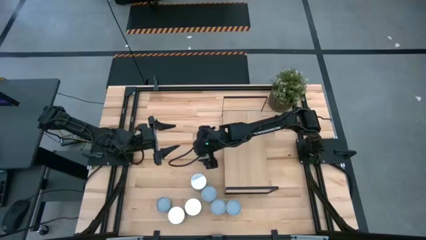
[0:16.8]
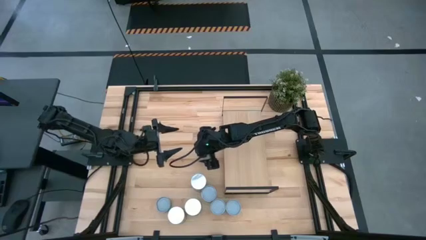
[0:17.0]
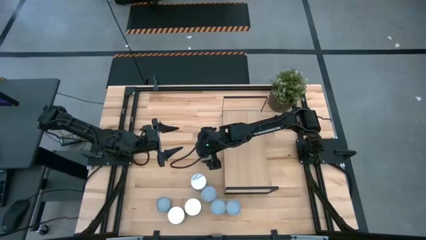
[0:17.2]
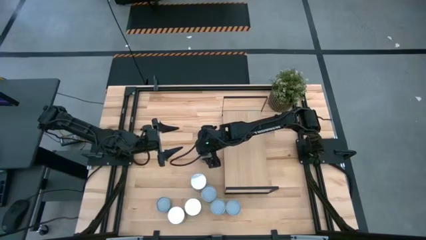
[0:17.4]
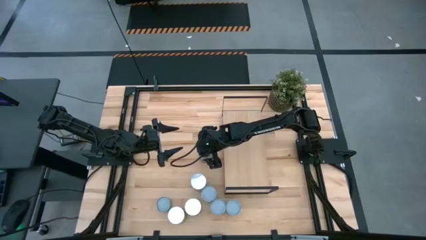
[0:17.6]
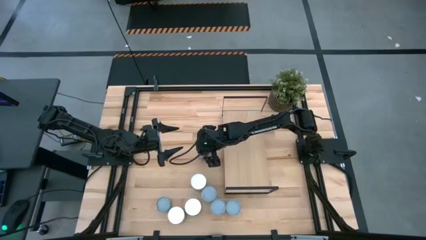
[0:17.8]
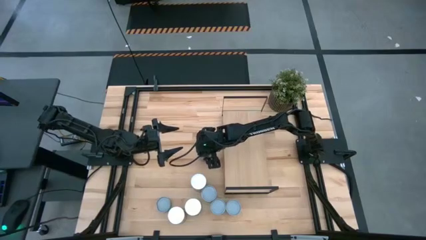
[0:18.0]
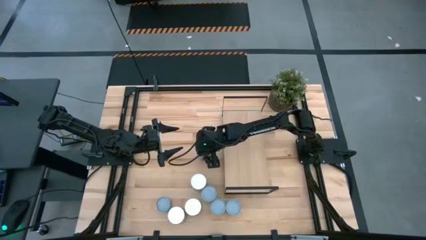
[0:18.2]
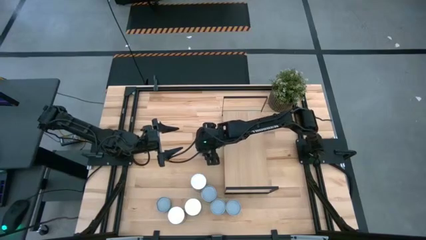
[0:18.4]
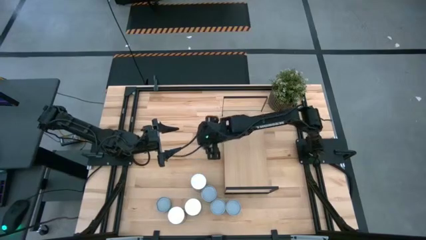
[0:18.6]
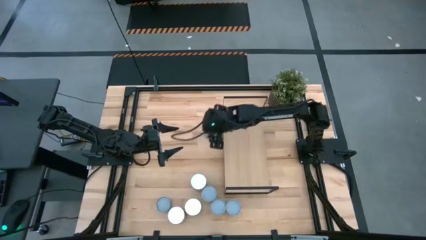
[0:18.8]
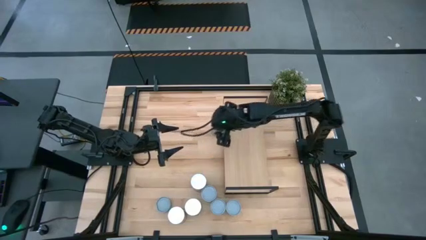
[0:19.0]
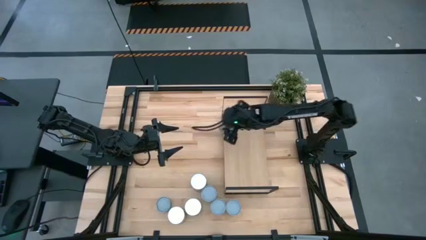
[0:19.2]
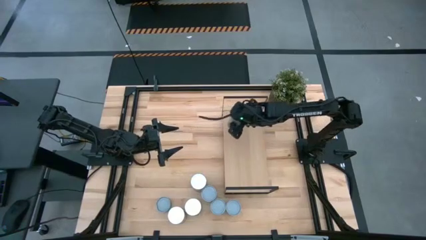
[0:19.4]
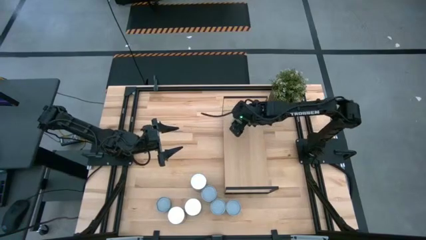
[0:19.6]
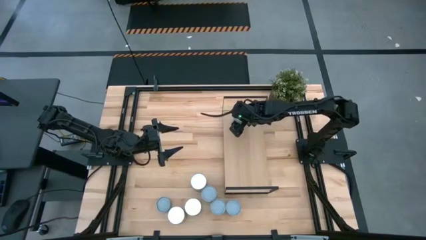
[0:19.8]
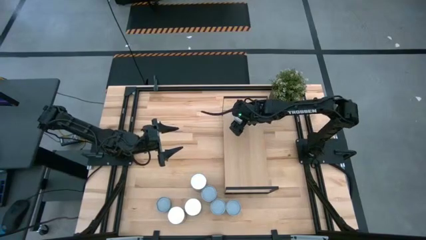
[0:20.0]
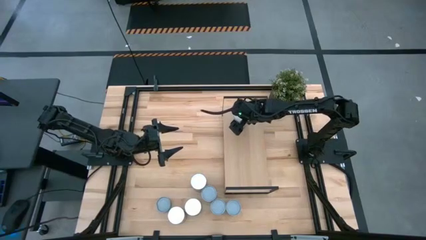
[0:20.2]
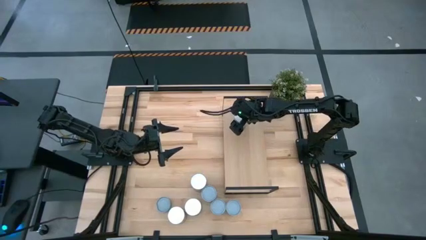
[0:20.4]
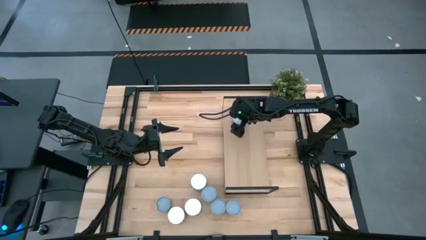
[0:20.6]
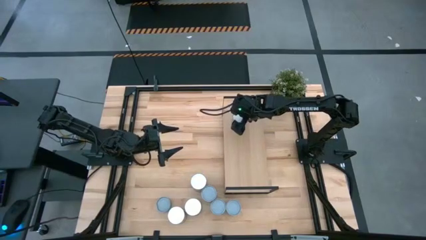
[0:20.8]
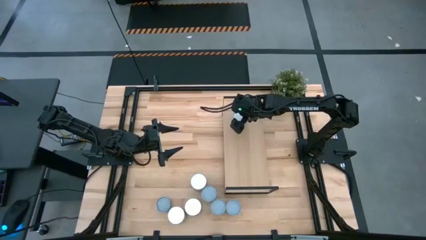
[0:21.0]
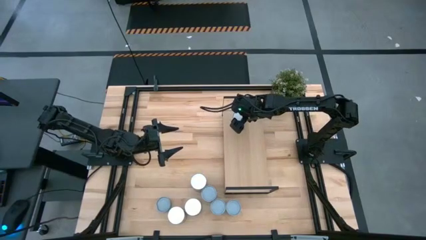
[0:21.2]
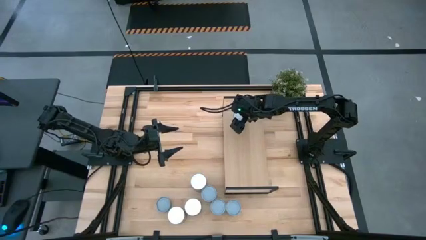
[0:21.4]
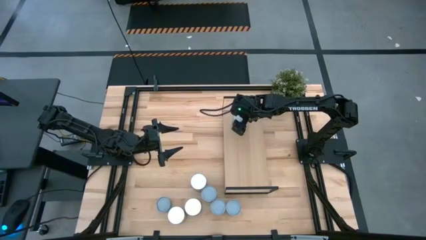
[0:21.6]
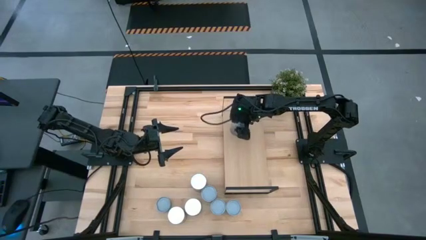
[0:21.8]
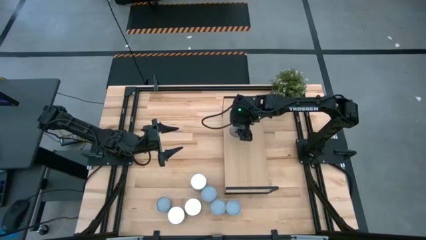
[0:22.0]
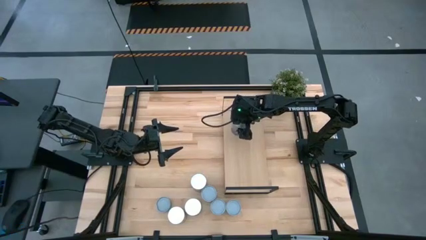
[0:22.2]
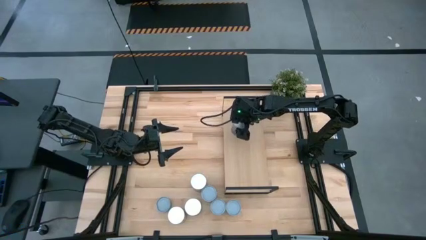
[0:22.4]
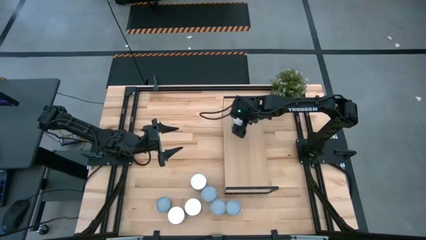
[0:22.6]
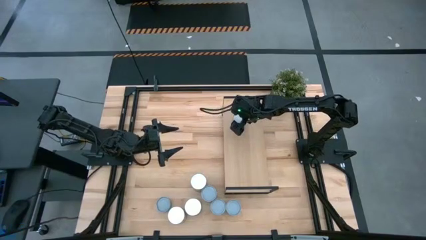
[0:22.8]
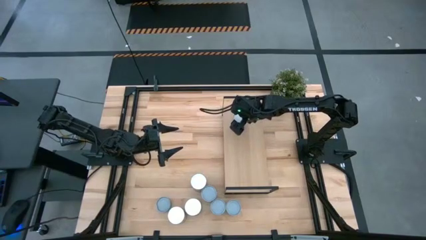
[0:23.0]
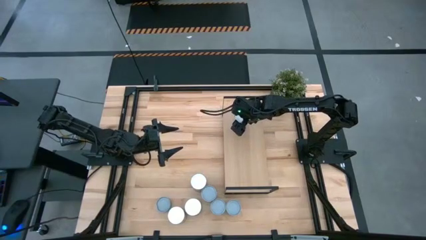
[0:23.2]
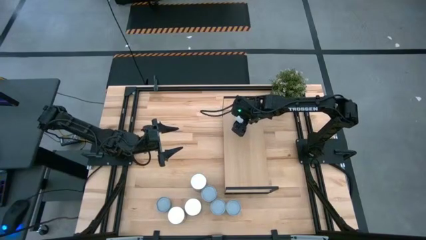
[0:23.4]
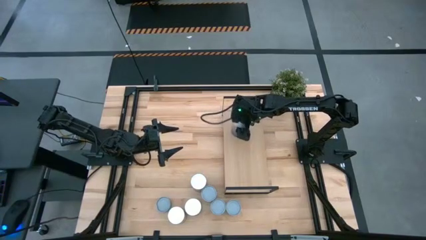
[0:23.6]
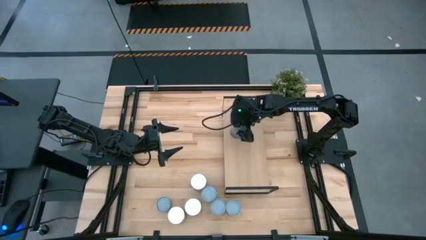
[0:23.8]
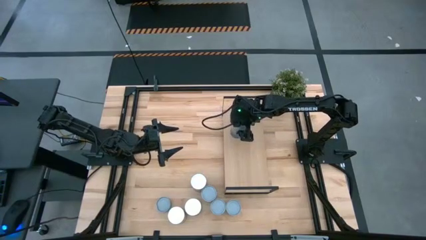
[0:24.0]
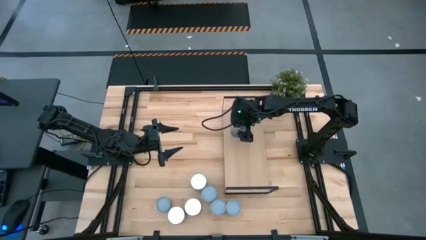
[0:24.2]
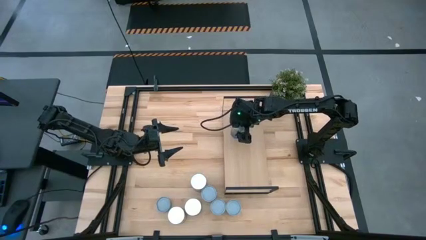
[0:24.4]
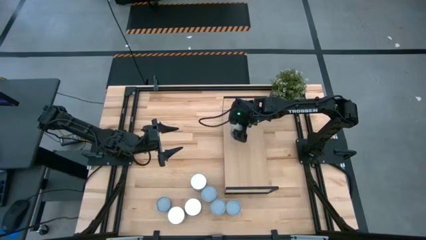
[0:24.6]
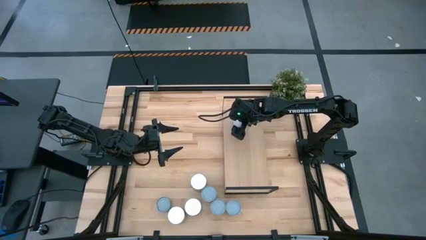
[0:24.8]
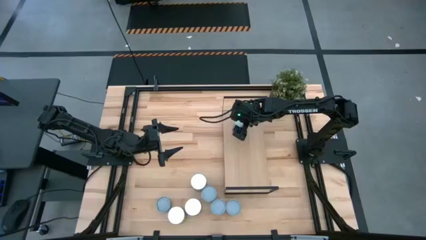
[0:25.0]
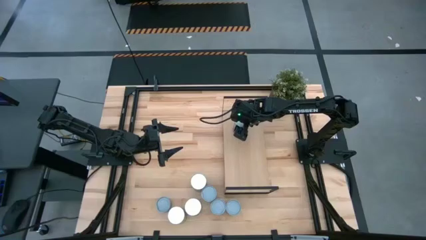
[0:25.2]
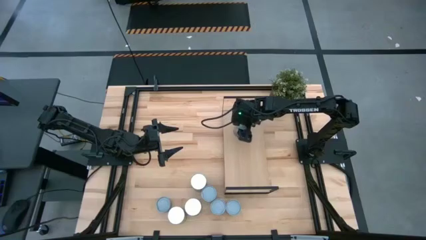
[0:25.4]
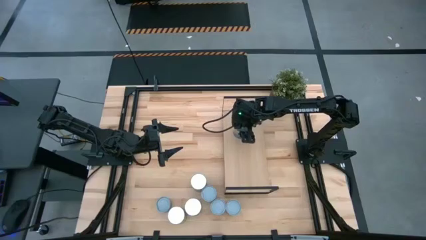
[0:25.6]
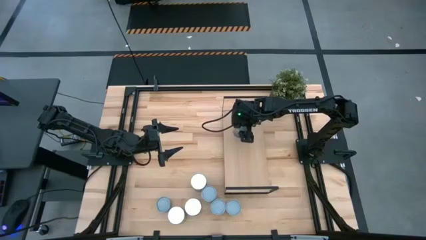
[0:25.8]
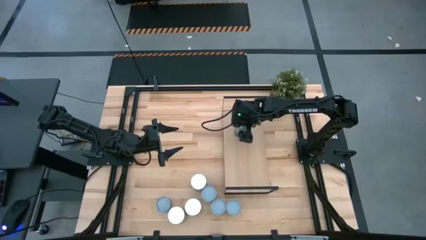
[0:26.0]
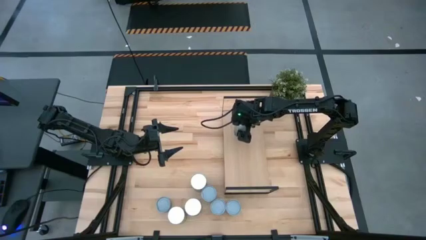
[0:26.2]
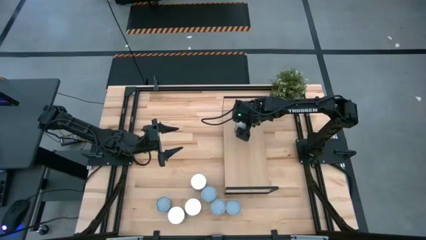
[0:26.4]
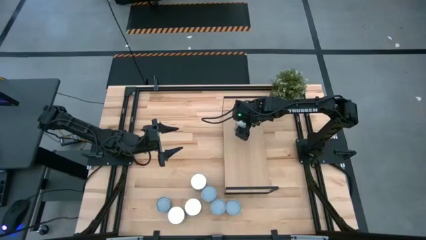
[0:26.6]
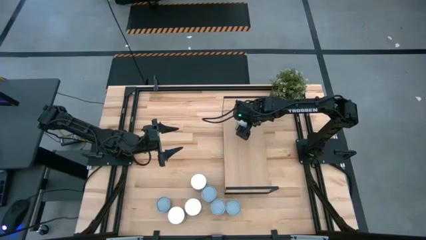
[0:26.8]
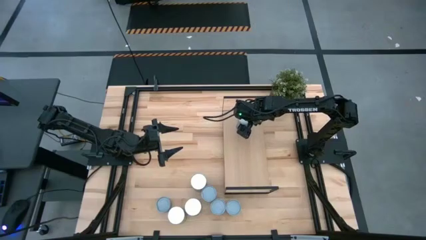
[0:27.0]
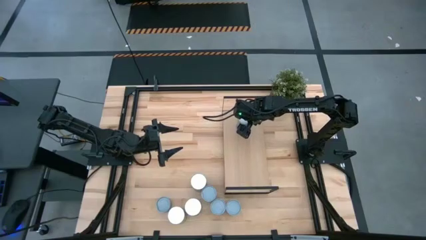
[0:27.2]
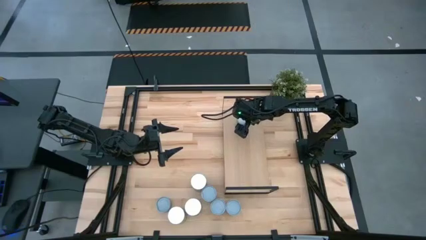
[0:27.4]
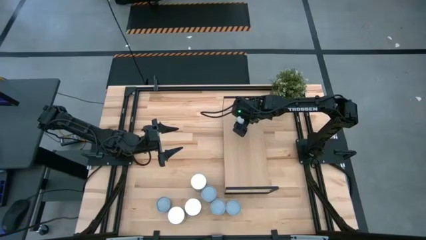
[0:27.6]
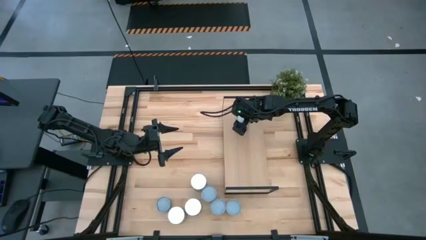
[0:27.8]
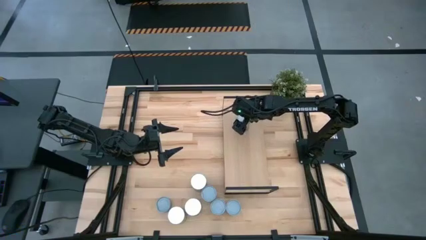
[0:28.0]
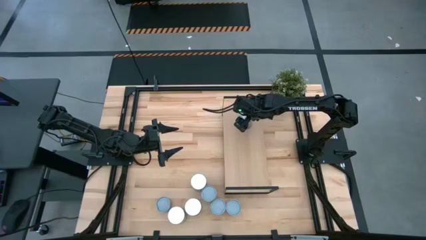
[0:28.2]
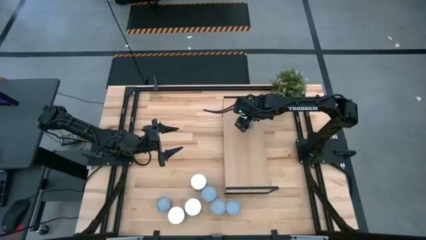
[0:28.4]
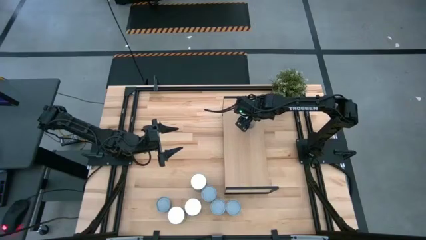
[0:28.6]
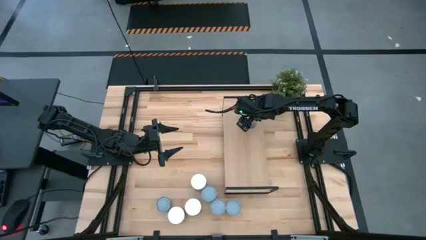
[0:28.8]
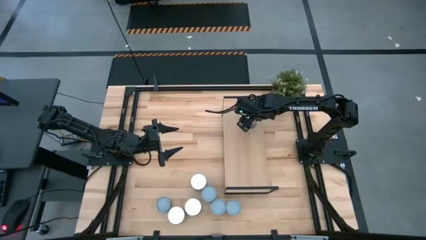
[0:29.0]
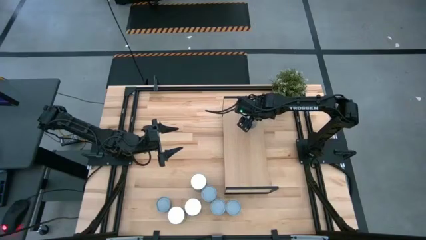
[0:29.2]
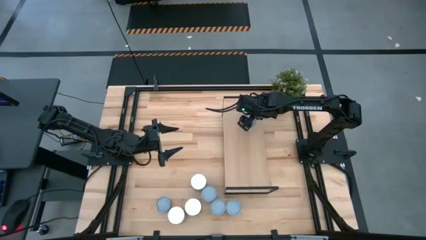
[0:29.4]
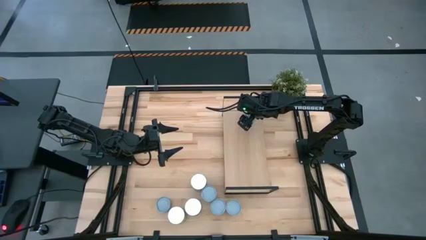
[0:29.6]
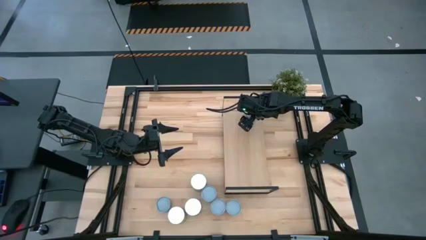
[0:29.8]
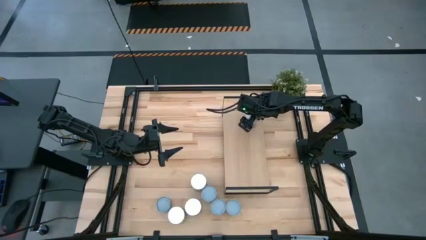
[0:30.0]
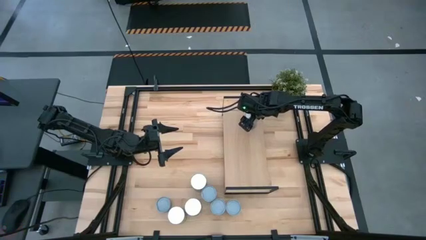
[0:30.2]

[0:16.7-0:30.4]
Task: Pick and place cans onto a shelf
Put the canned peas on the shelf
